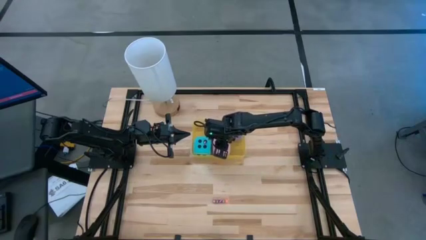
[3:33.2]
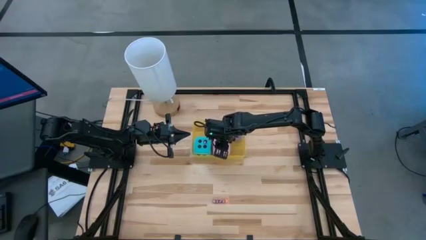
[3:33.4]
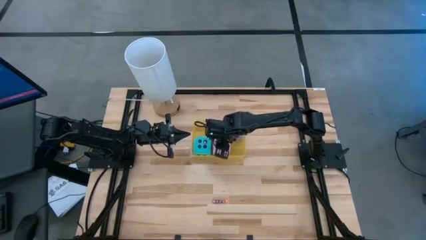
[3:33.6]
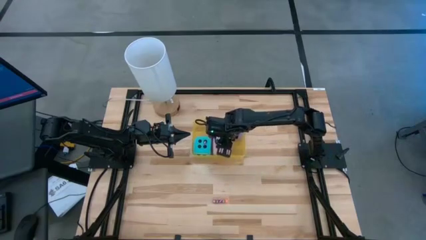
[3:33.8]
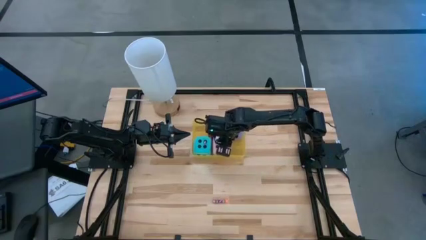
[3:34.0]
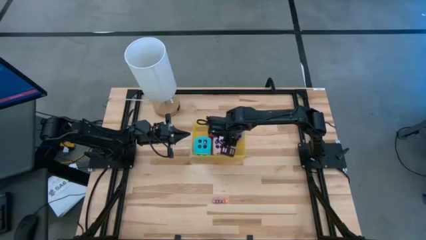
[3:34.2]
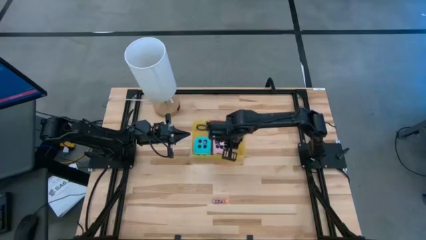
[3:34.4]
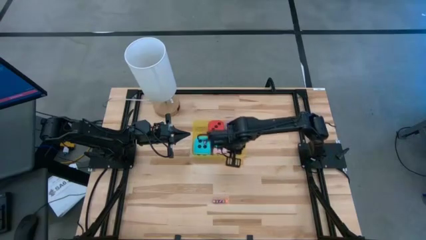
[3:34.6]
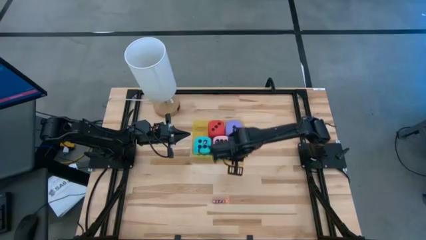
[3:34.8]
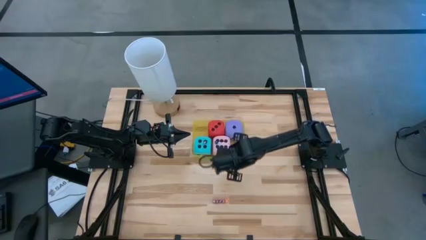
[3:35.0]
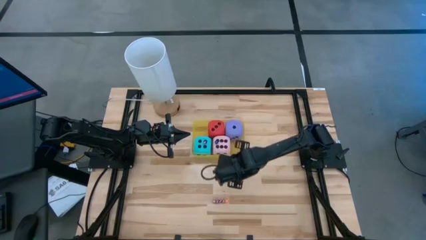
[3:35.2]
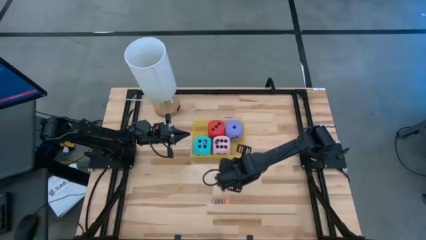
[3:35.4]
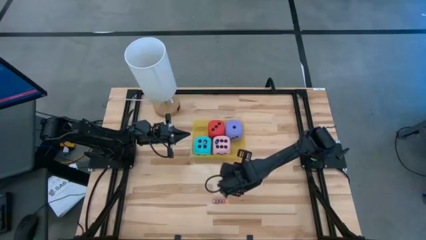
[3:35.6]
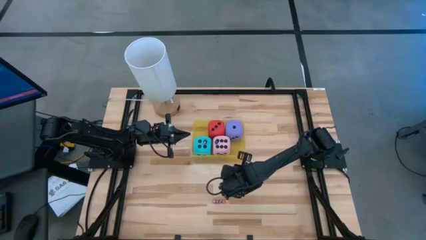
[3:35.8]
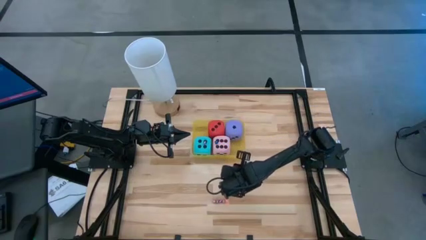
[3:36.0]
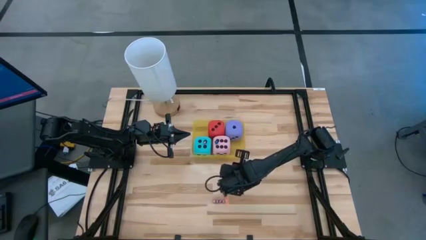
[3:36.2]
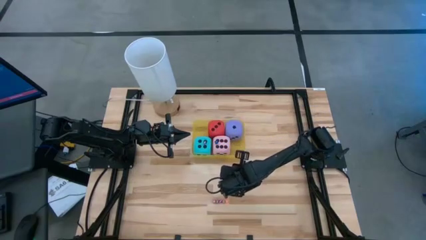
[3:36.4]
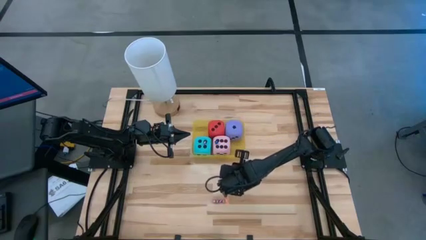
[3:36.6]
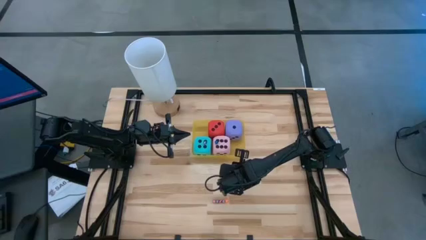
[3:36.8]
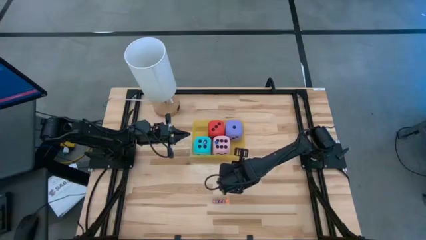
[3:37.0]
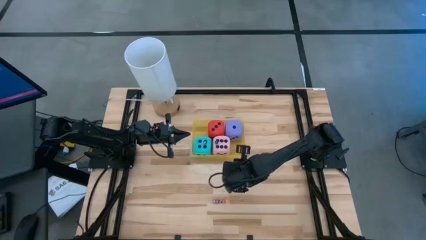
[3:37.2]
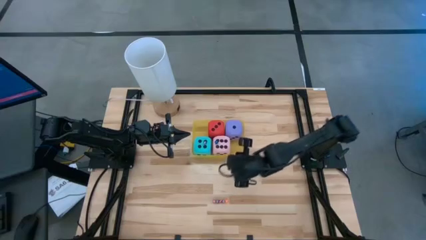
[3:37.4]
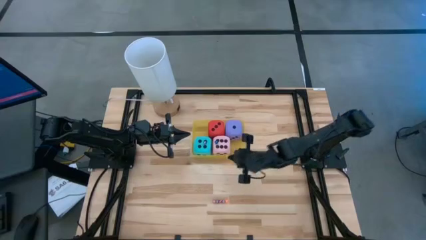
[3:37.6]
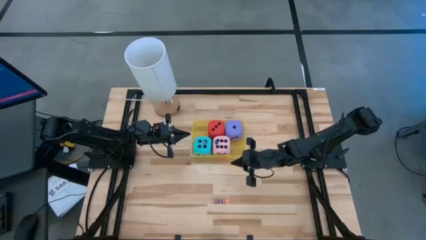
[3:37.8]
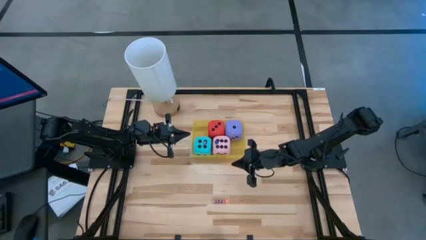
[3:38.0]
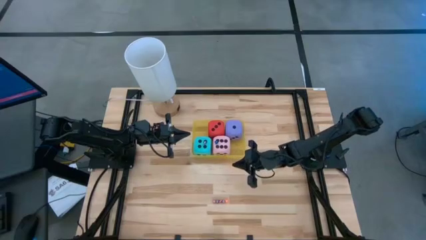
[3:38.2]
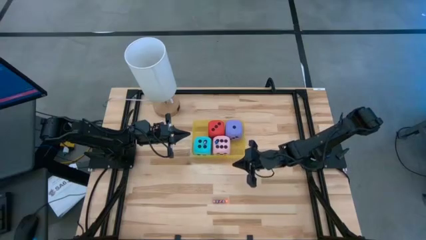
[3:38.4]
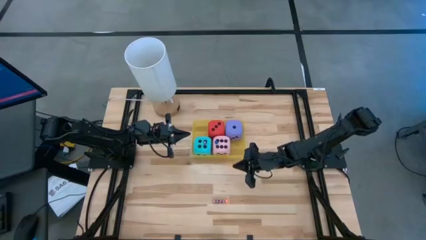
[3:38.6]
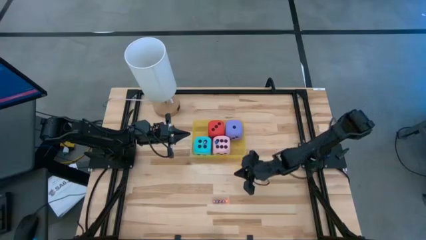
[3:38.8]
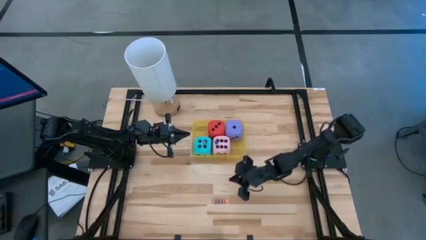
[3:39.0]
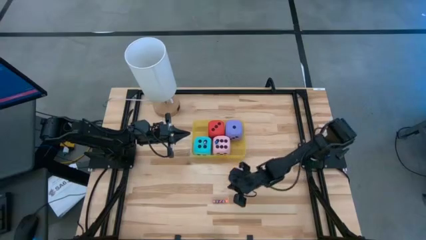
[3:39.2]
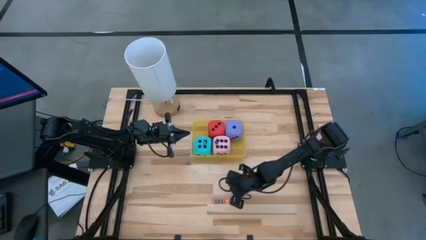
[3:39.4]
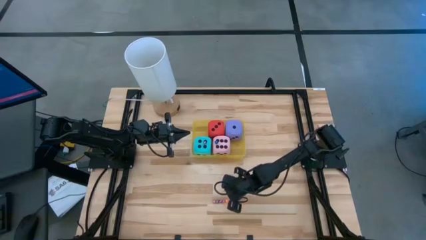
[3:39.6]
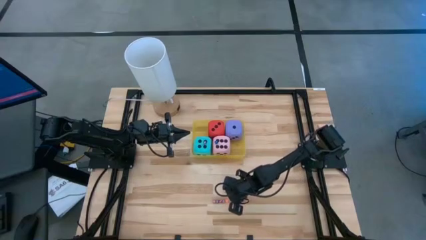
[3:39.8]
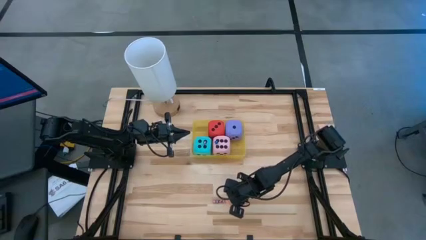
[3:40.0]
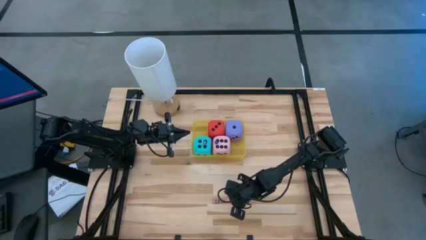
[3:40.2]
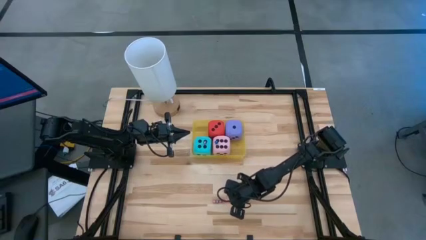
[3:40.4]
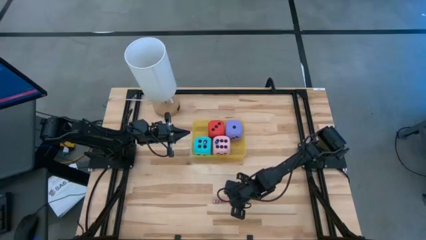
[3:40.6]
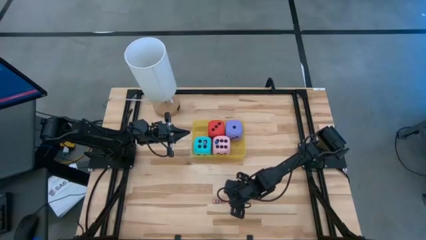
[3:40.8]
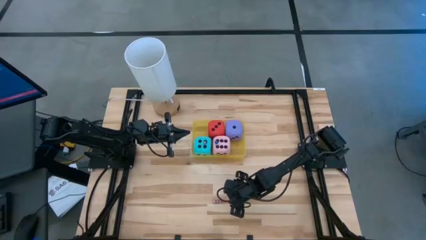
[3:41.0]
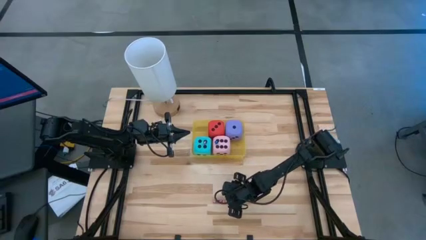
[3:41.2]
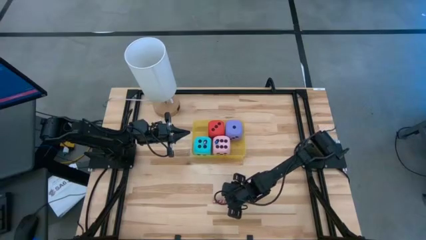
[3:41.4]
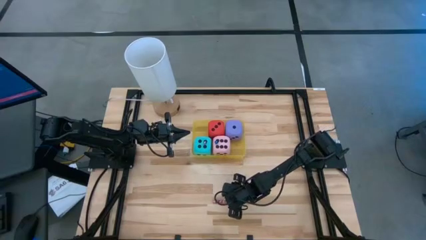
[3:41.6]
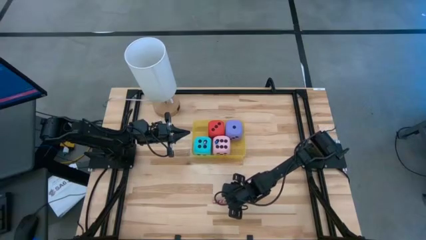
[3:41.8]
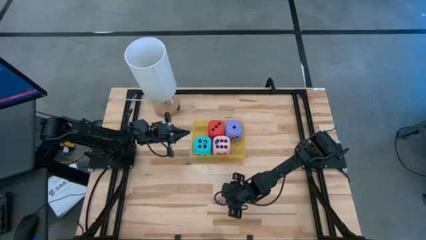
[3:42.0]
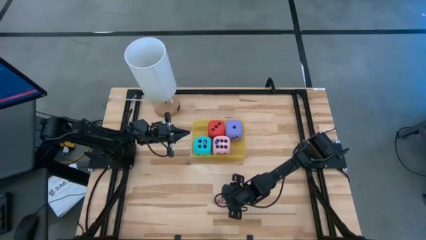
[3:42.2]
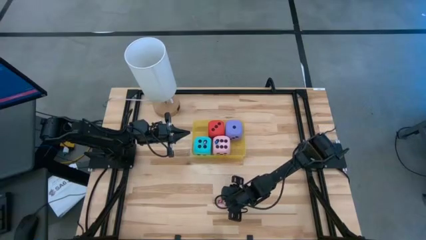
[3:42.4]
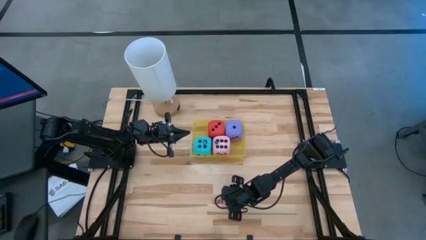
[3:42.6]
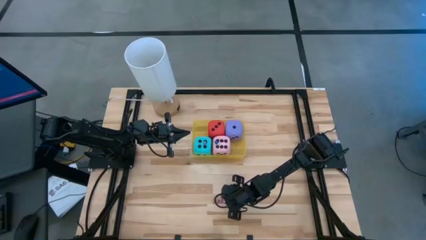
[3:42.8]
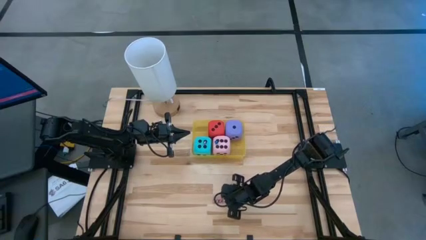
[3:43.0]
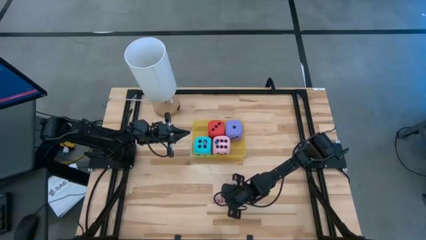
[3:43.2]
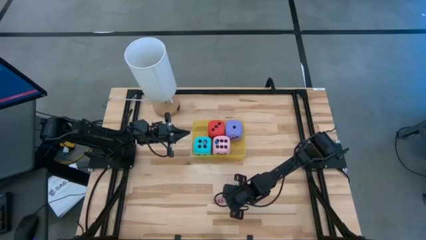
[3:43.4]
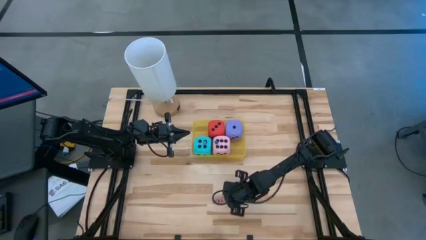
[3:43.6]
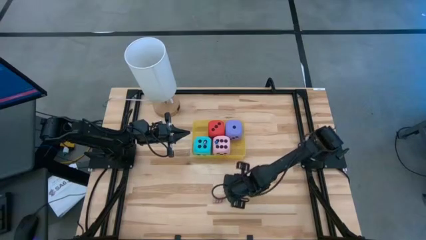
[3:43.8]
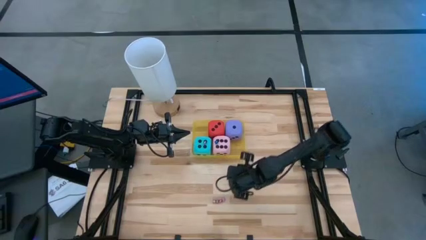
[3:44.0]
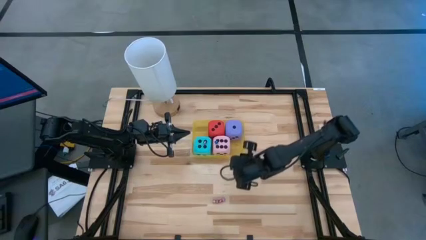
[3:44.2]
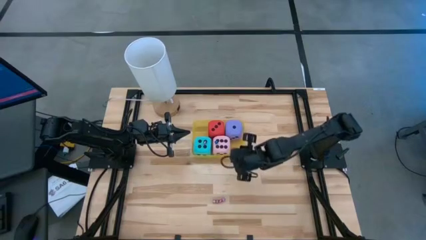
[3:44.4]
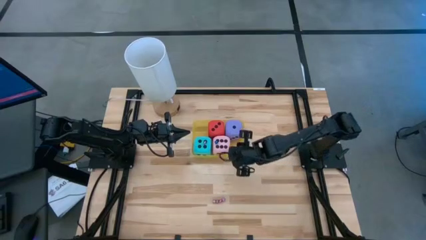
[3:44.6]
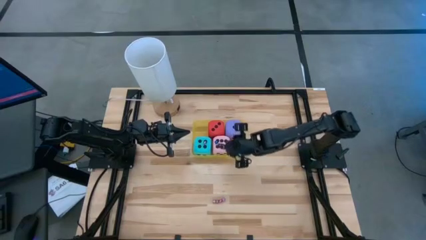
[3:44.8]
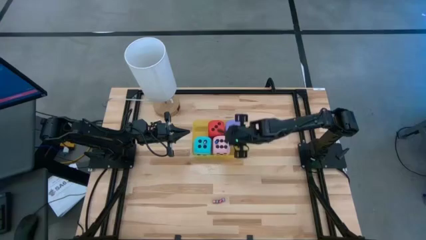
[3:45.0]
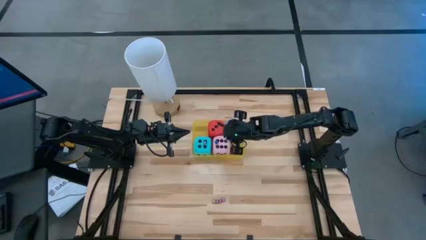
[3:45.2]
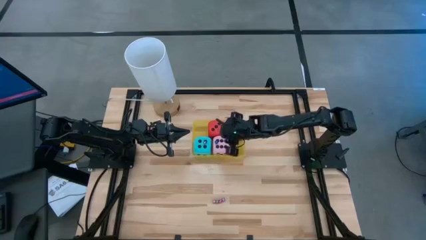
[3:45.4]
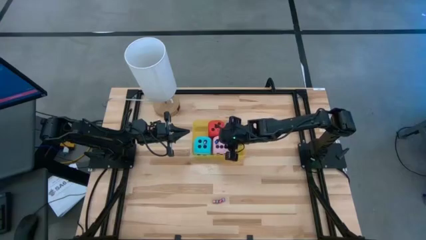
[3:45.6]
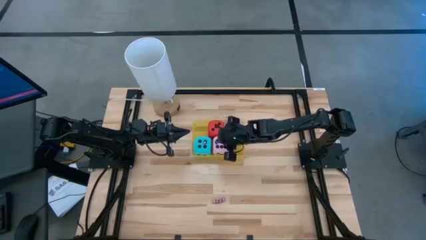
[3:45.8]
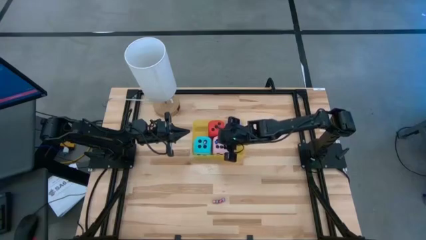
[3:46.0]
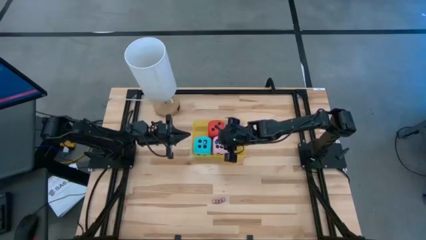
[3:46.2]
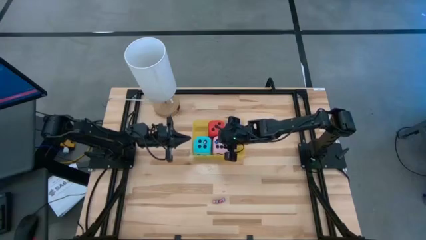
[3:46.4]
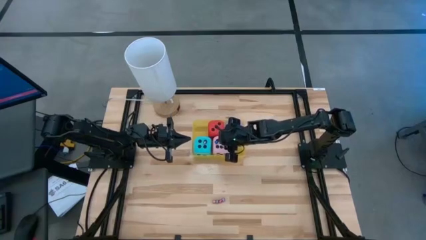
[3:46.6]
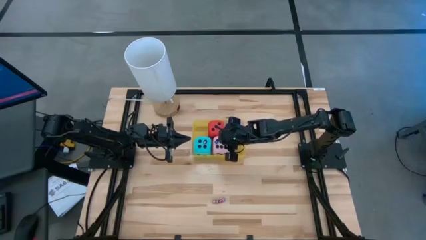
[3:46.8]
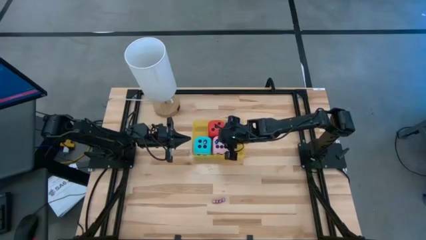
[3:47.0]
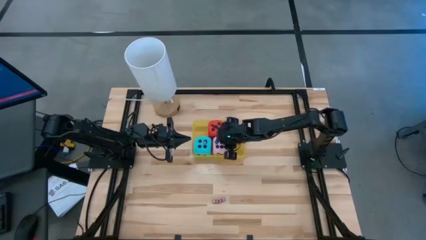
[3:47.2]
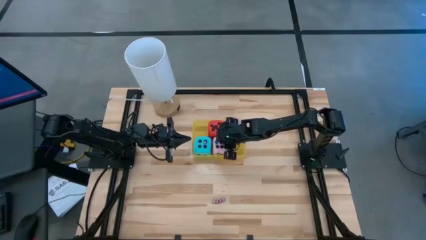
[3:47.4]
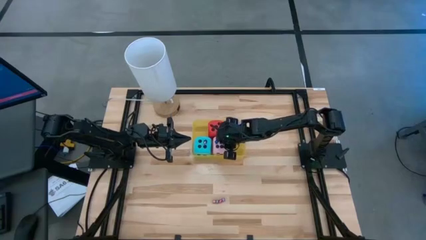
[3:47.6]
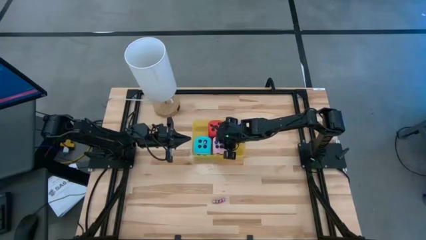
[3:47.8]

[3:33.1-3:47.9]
Task: Pick & Place Dice
Put the orange dice into the yellow bin
